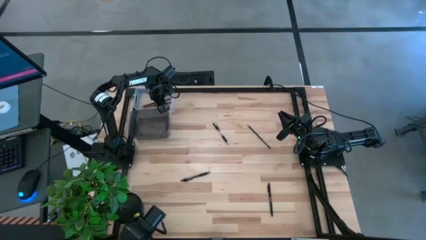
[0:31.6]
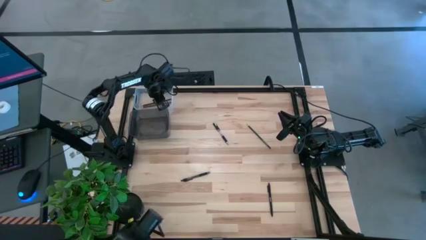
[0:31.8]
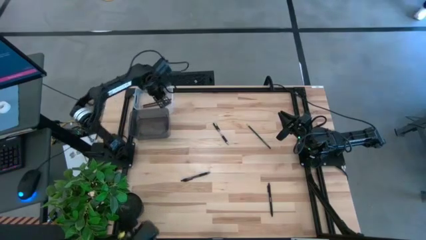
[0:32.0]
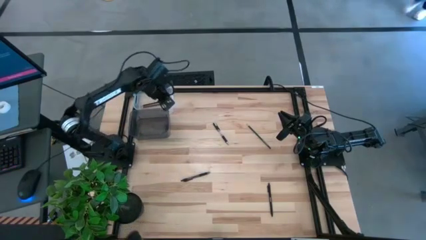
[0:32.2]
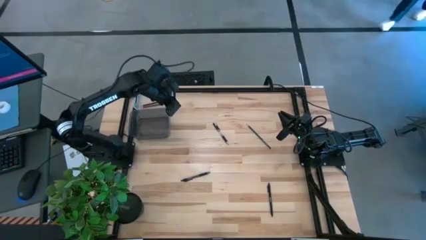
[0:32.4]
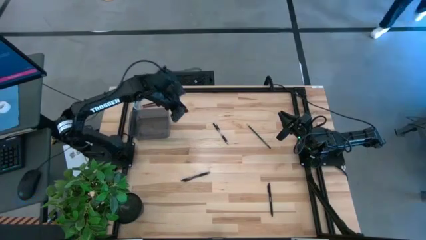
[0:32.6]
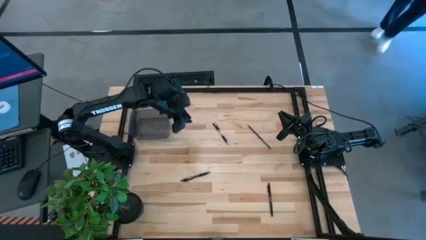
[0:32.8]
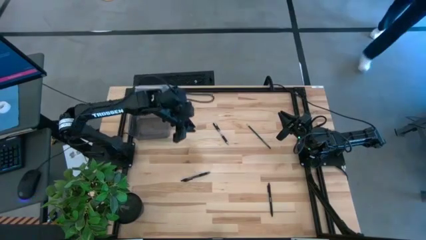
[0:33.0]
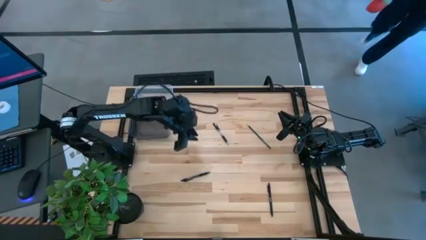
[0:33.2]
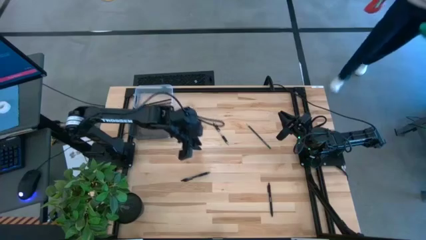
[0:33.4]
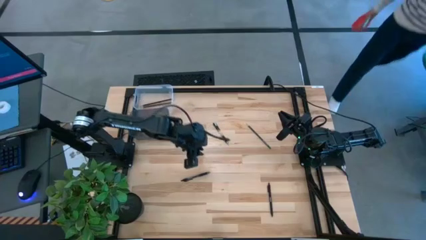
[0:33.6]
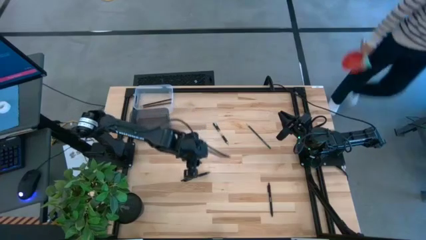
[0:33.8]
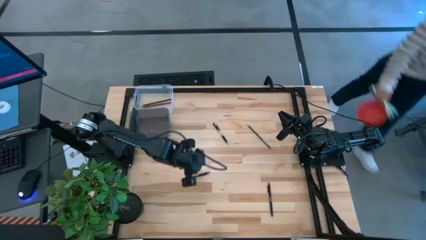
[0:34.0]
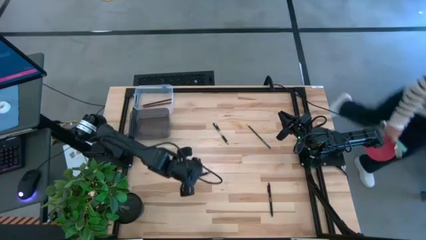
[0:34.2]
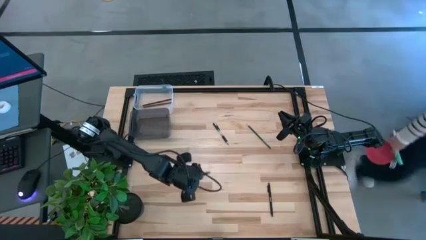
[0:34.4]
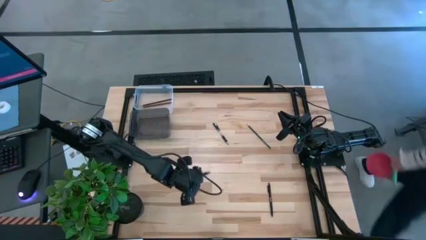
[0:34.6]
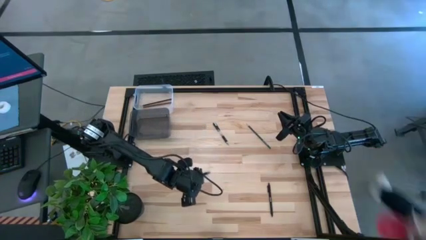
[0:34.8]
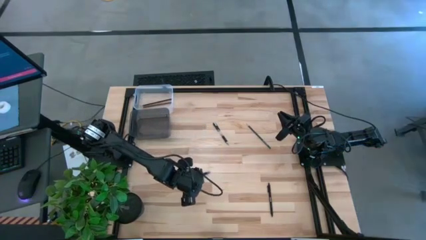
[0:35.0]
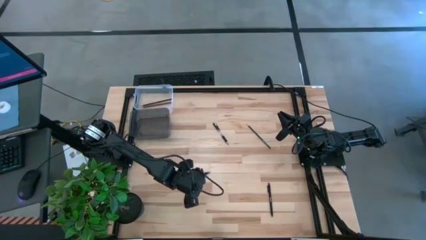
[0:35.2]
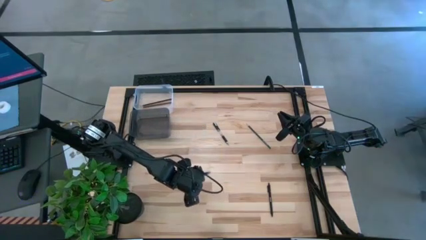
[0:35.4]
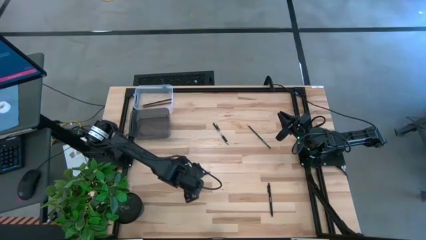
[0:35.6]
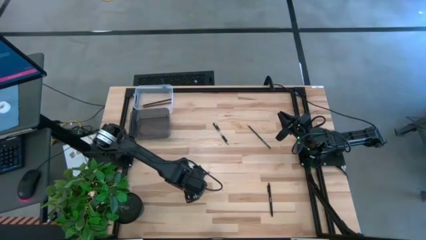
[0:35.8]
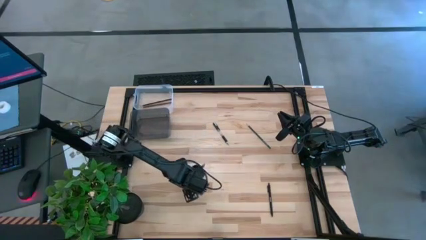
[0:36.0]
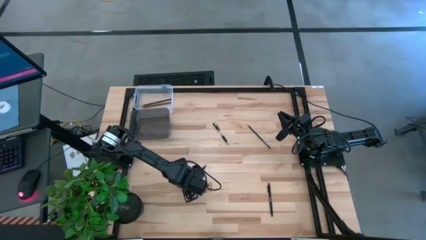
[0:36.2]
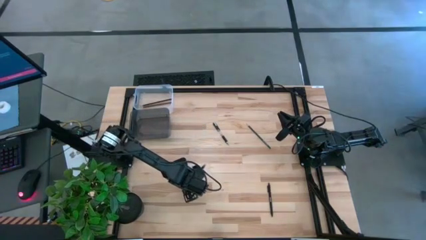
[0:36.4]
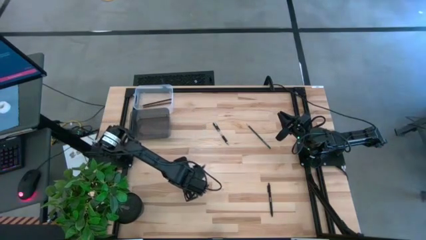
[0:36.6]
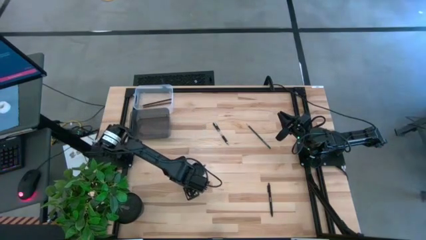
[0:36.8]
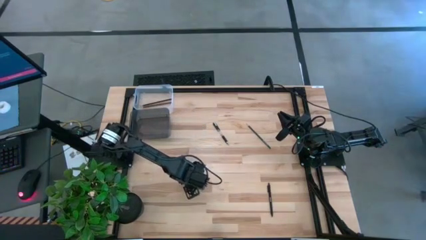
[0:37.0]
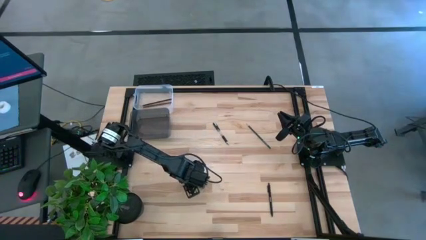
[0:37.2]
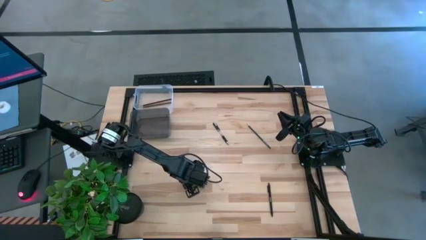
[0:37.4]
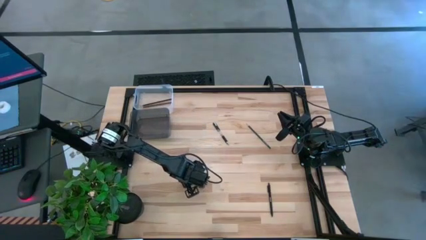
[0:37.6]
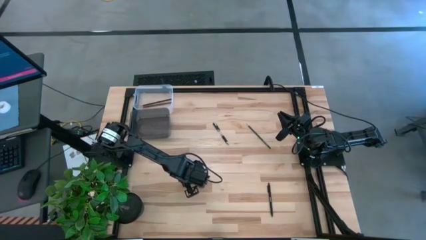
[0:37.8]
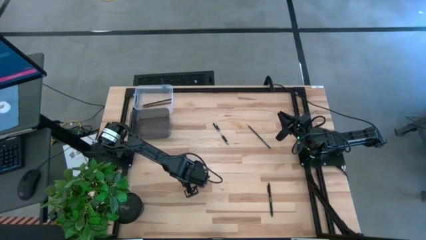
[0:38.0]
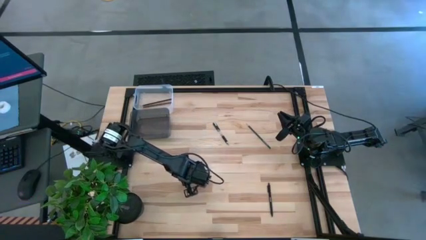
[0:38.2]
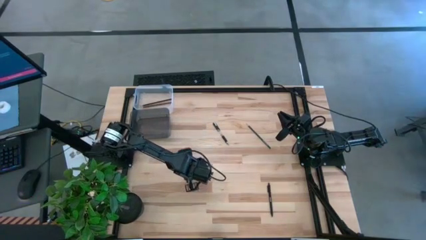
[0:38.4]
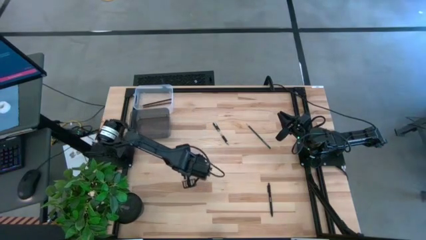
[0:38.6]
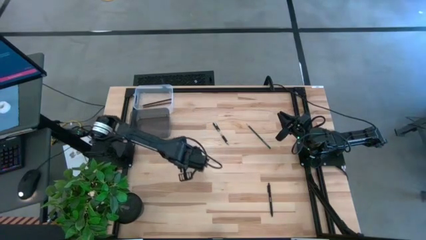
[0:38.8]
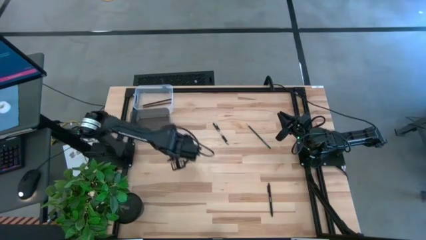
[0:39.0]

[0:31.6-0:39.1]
Task: Sort pens & pencils
Put the silver pen into the black bin

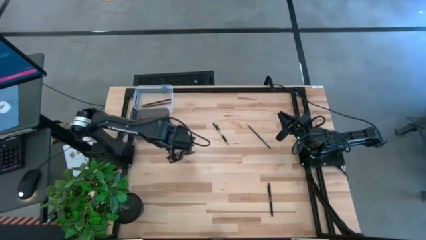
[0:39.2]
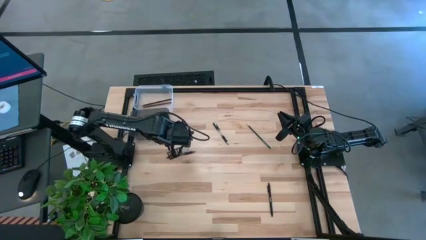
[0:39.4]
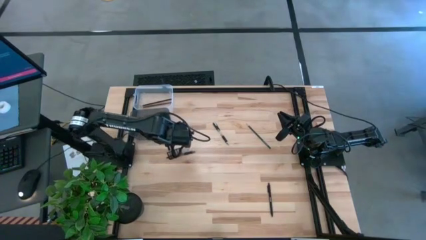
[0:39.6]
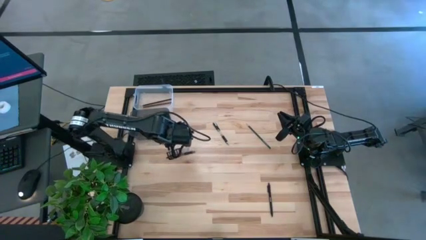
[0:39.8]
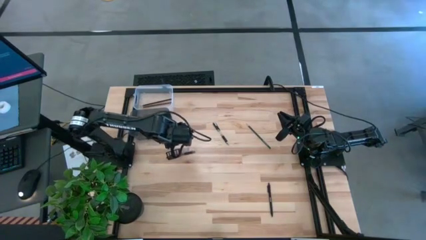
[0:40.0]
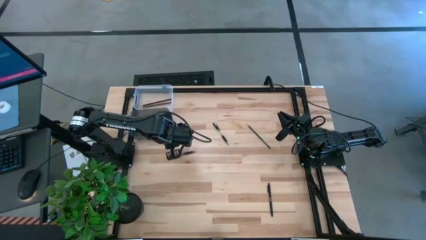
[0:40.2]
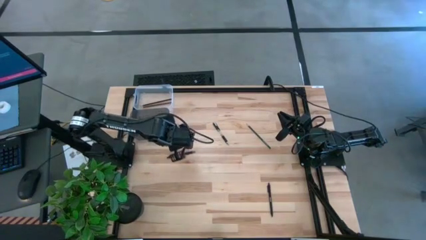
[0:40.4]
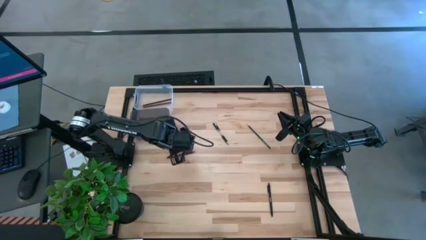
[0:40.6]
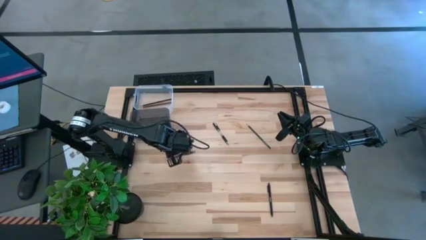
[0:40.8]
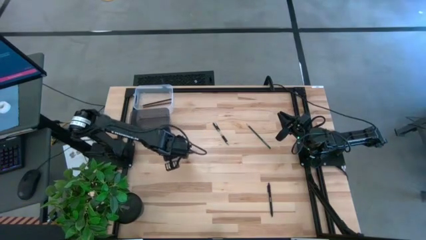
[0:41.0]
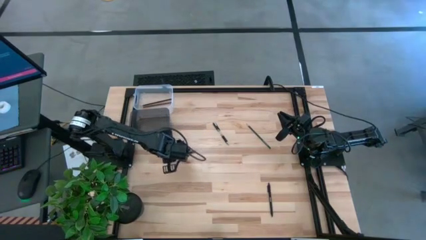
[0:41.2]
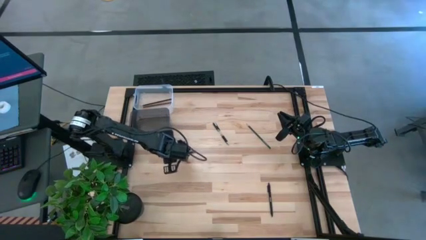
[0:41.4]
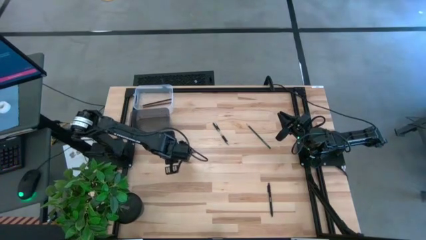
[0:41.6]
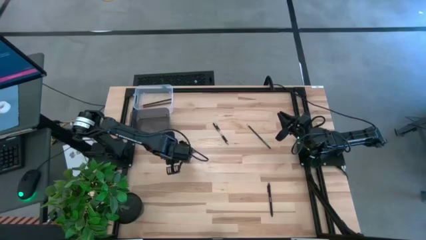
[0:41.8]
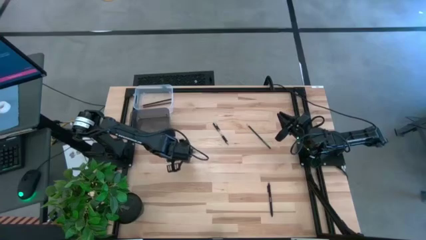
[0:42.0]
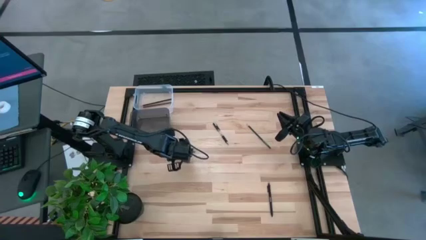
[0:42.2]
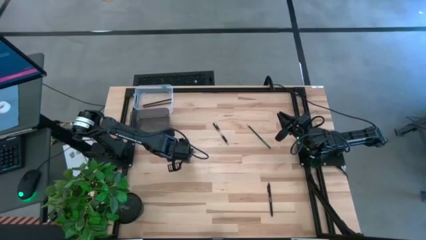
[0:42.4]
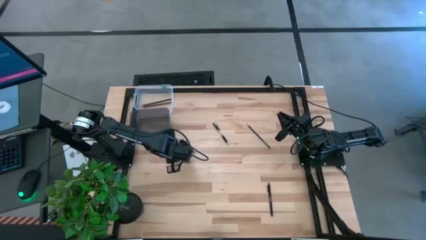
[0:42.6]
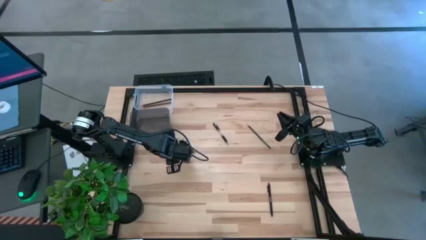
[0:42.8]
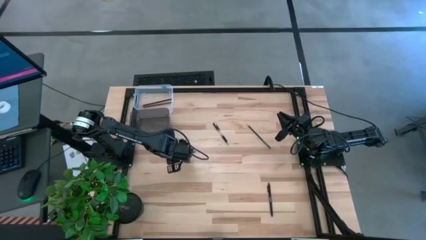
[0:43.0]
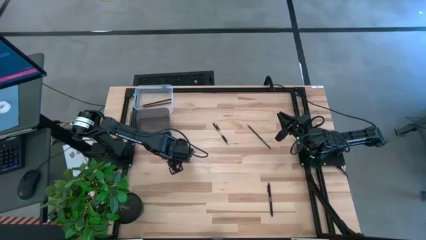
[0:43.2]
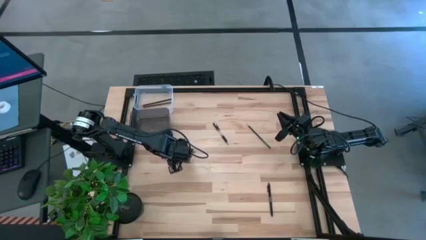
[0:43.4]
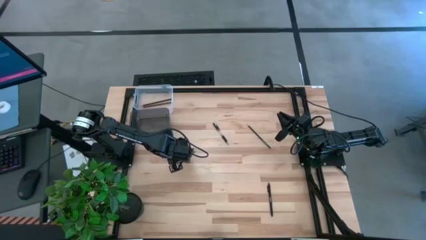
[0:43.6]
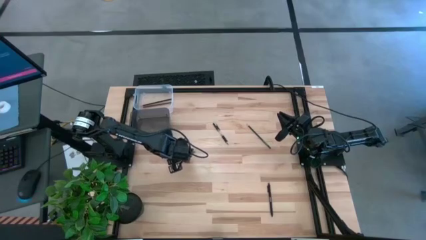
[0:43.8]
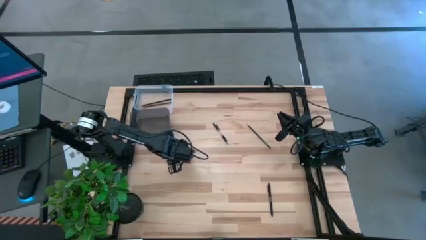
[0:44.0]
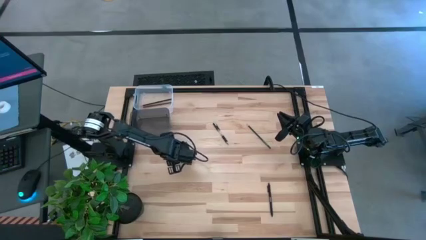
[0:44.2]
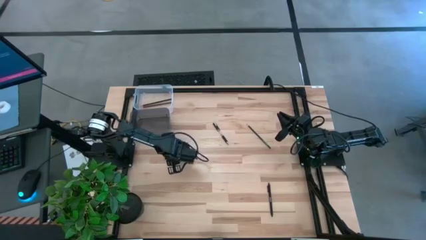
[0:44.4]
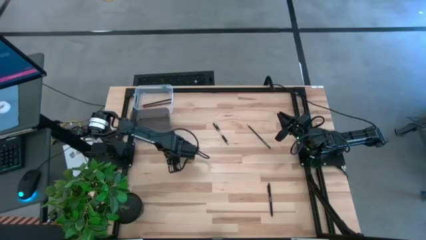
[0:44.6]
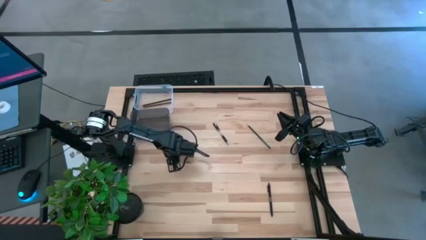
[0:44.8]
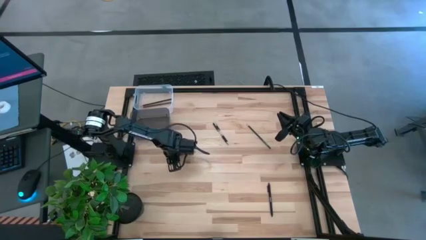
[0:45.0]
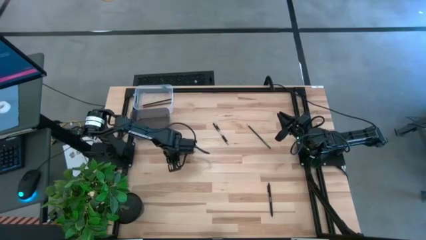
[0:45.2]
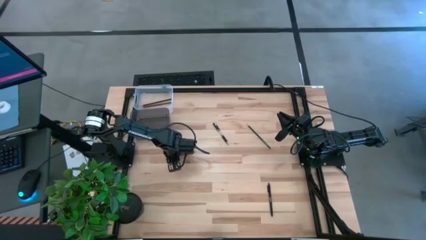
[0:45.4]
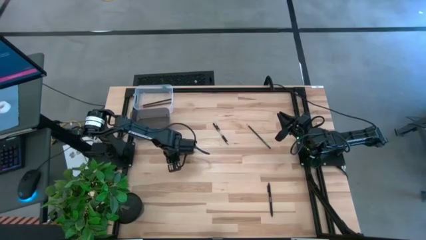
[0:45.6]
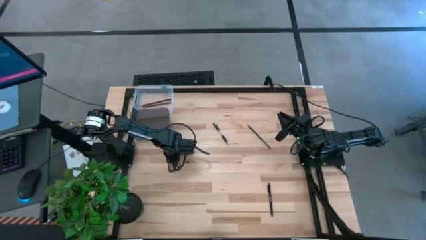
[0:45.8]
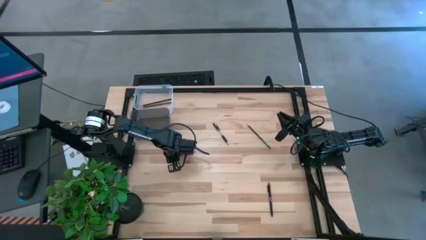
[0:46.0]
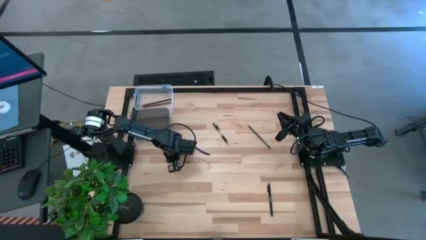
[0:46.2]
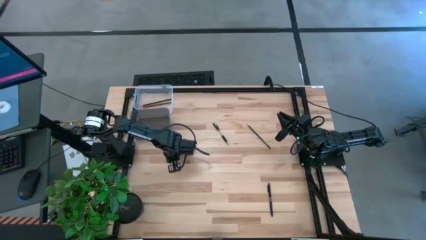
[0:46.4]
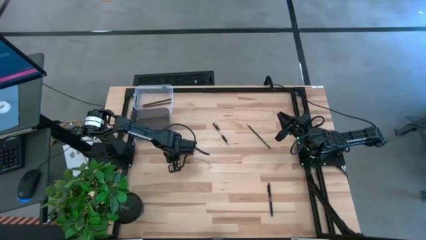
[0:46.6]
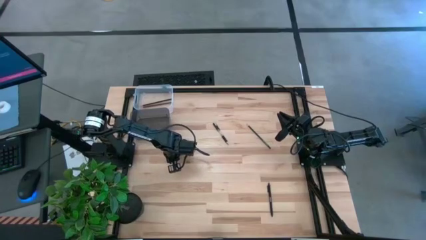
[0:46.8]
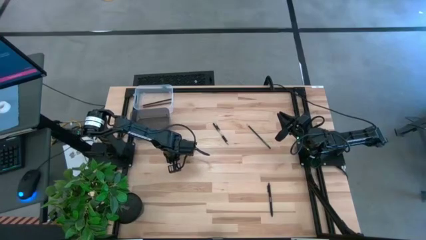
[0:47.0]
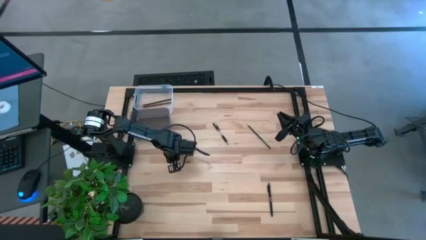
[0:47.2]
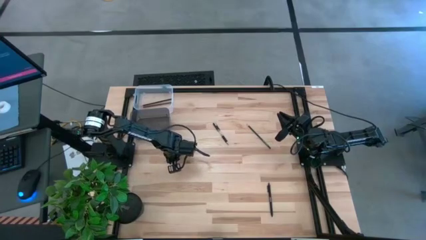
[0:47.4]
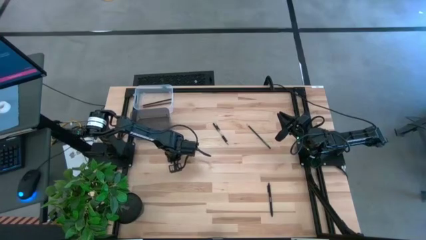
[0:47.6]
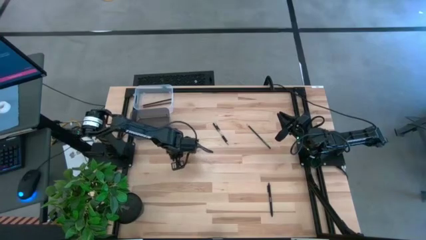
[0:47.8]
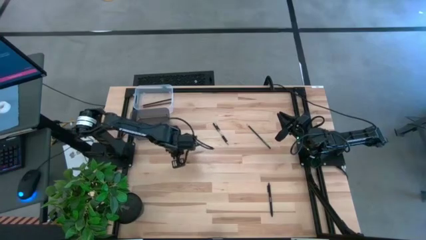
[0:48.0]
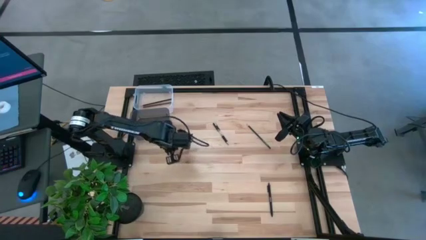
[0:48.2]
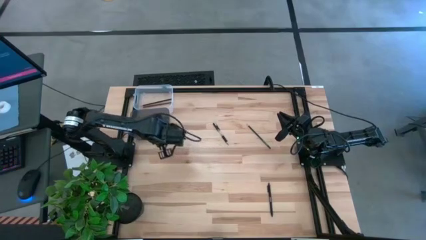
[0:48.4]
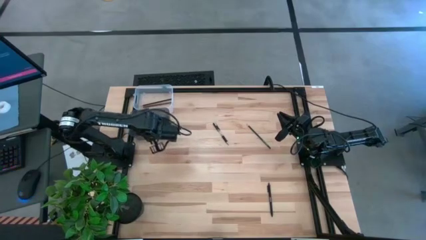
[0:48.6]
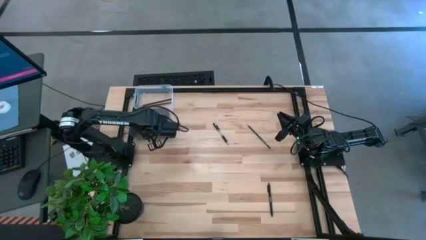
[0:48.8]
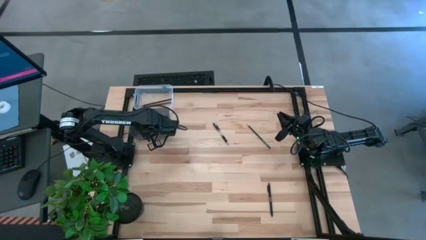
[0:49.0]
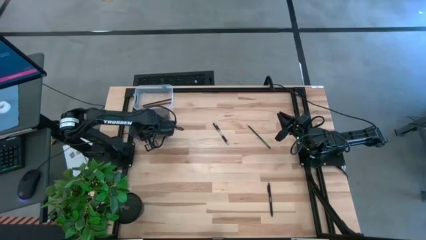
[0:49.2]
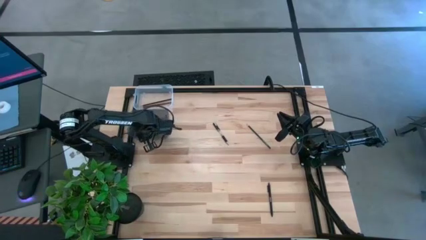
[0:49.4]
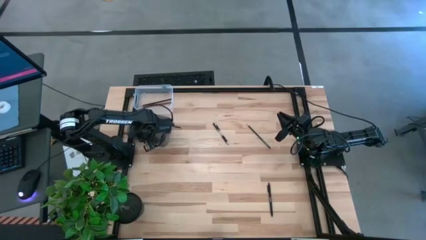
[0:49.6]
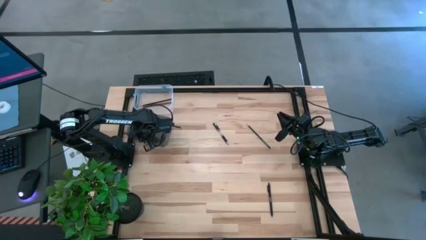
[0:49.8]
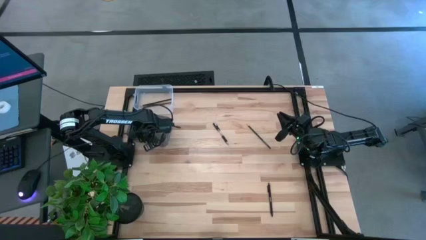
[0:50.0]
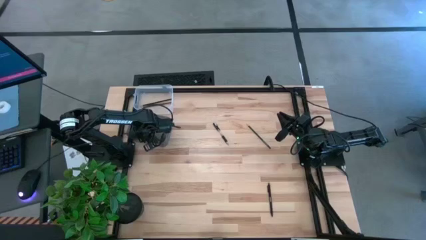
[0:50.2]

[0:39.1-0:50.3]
Put the silver pen into the black bin
